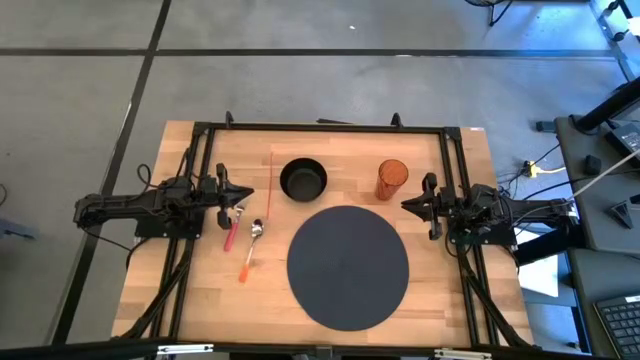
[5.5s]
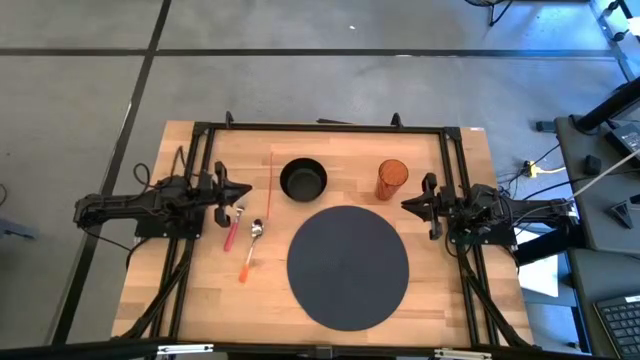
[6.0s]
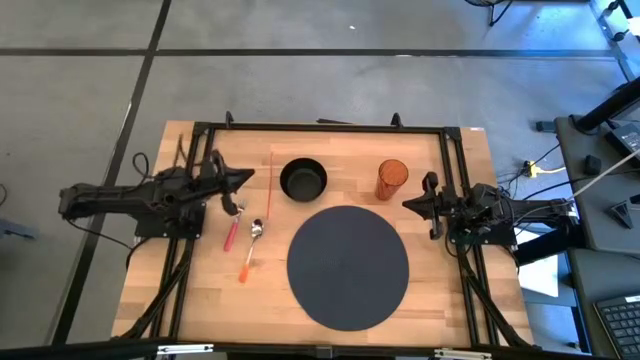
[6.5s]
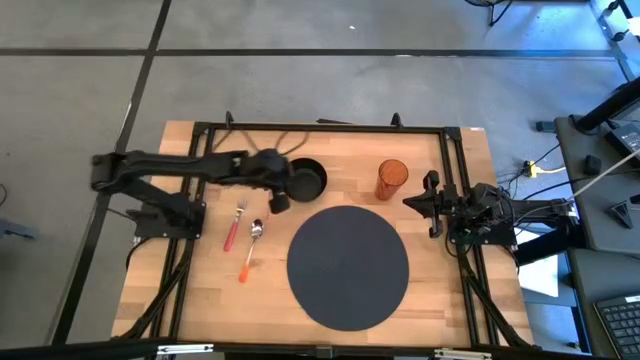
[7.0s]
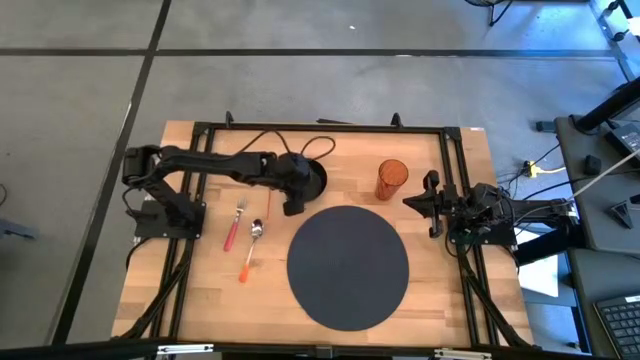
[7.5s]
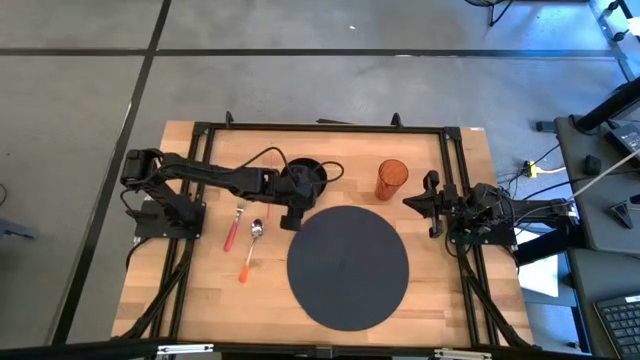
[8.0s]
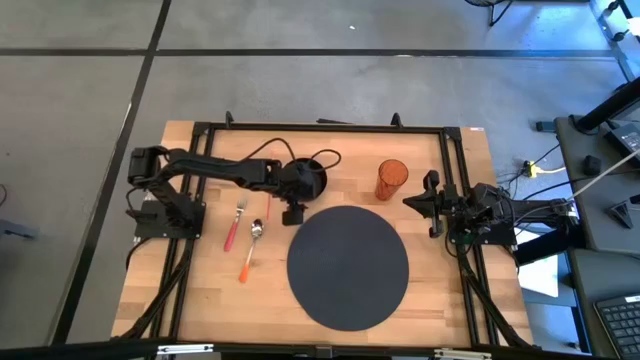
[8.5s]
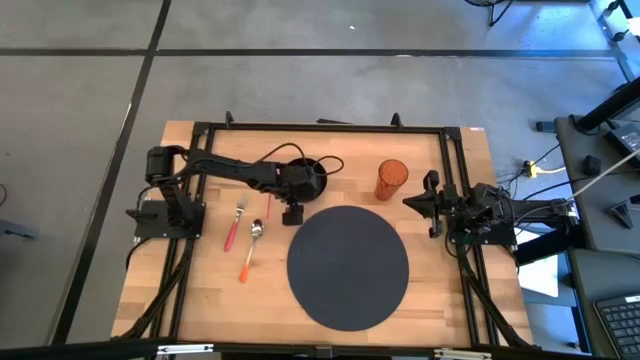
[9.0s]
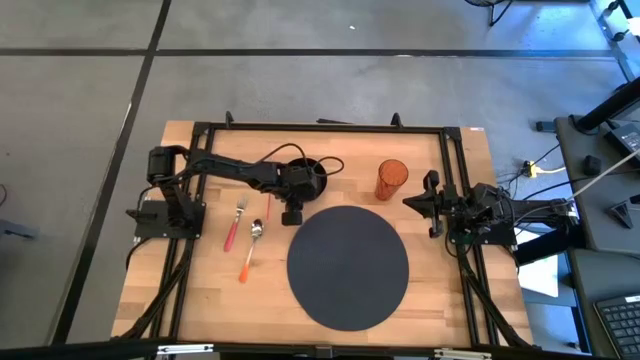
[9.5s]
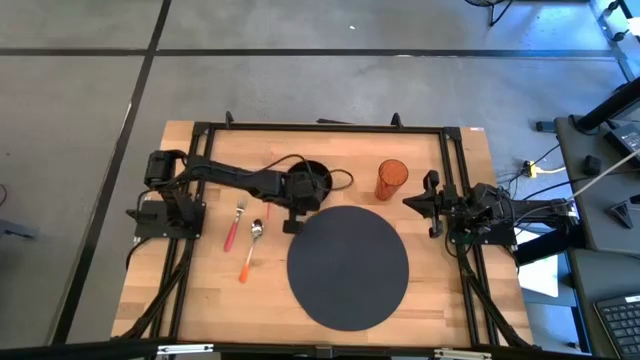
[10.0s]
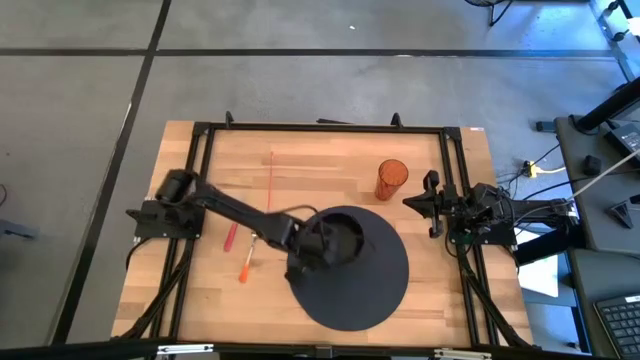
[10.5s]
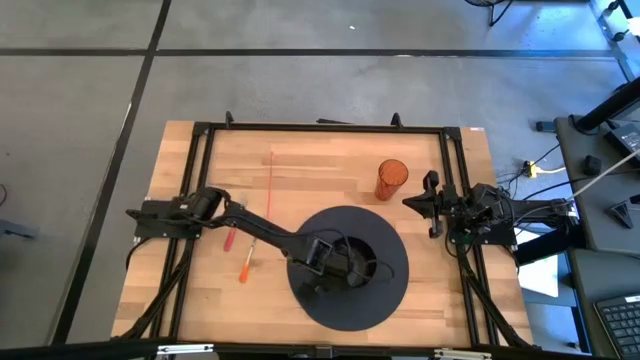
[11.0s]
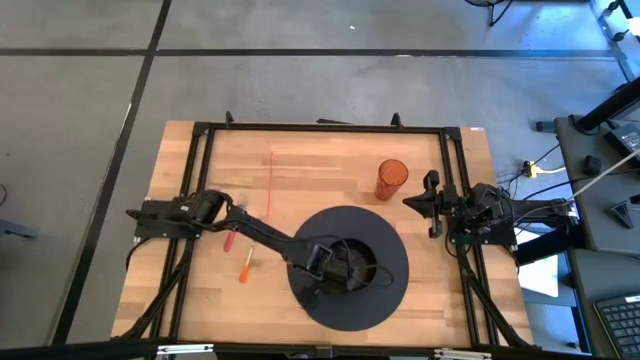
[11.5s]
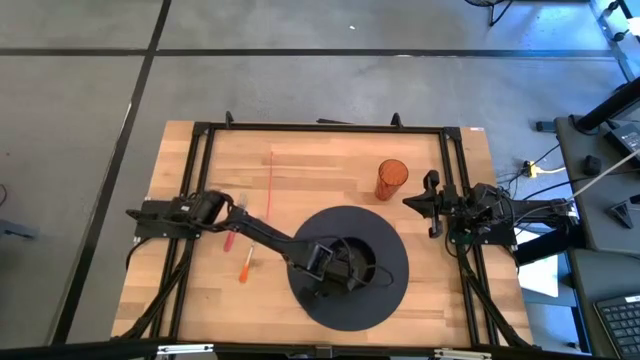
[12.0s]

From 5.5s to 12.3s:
Task: Pick & Place Utensil
Put the black bowl on the tablemat

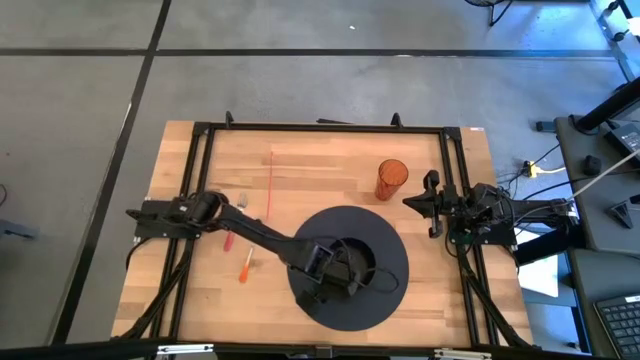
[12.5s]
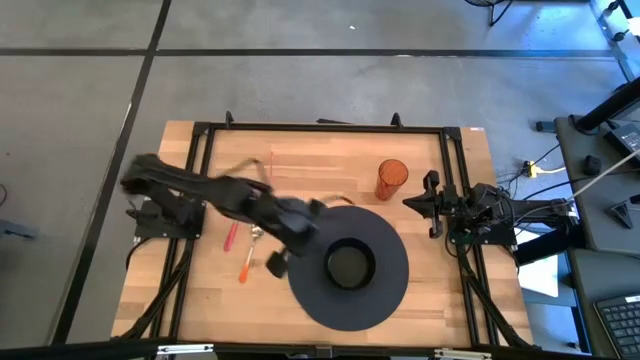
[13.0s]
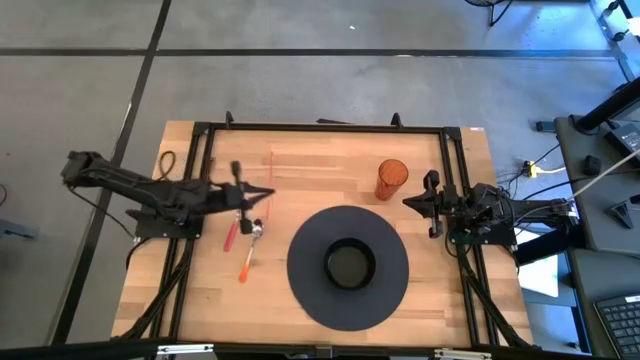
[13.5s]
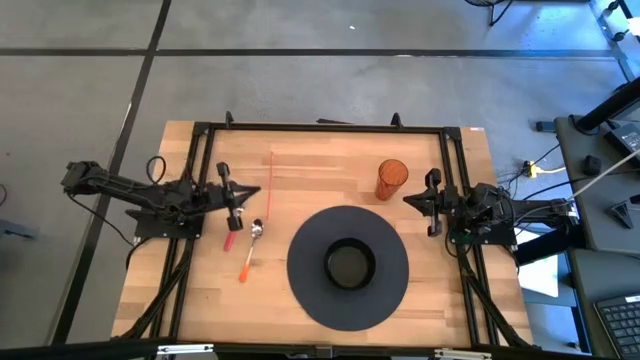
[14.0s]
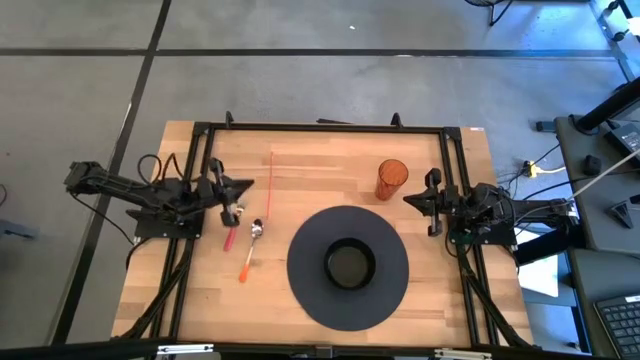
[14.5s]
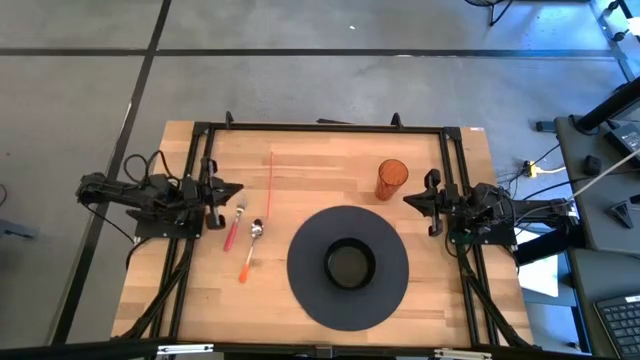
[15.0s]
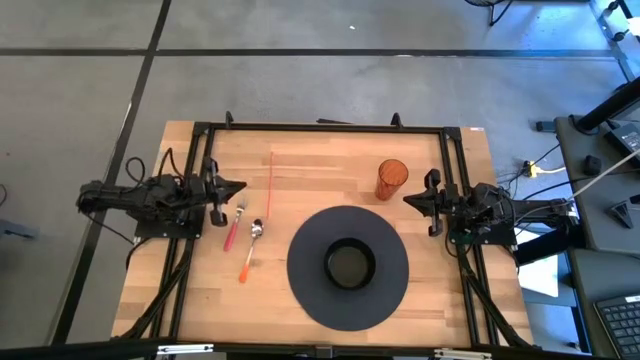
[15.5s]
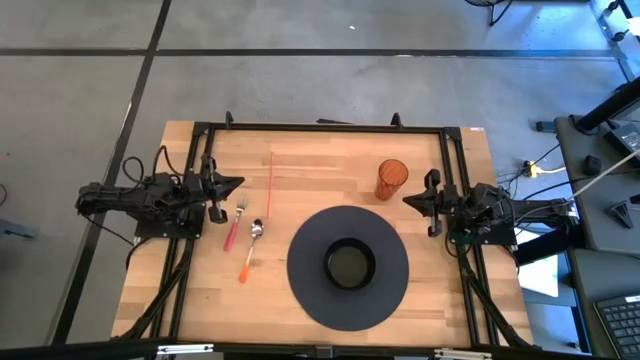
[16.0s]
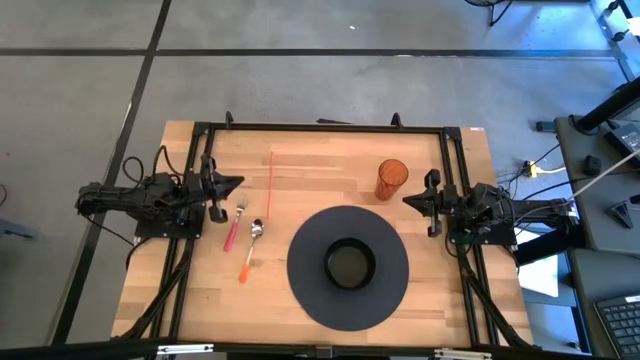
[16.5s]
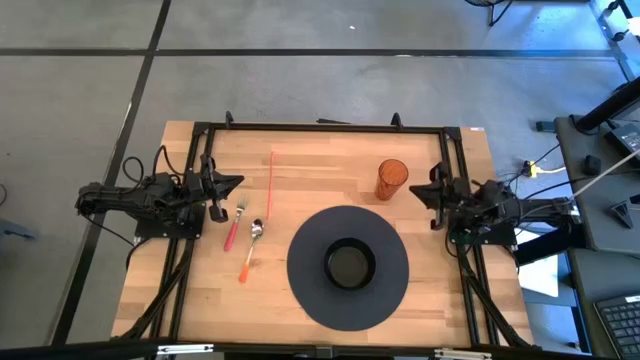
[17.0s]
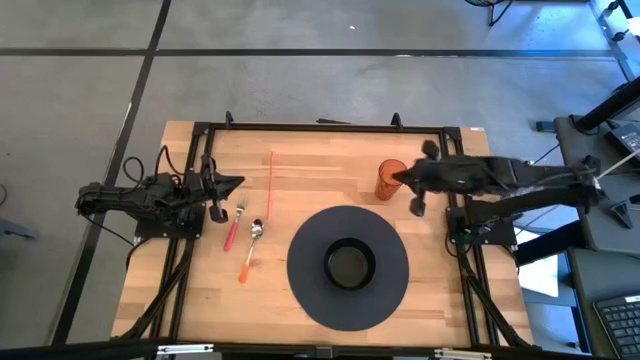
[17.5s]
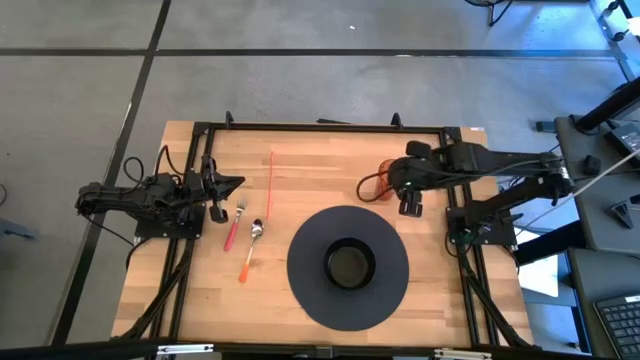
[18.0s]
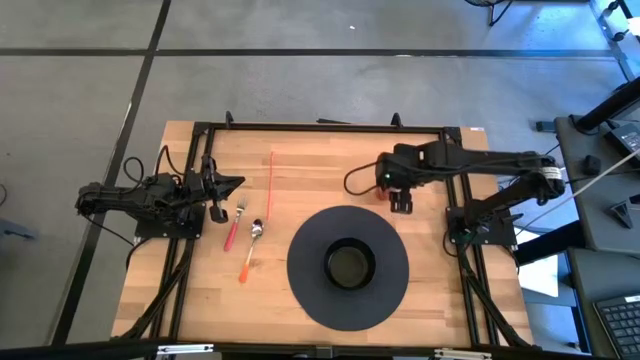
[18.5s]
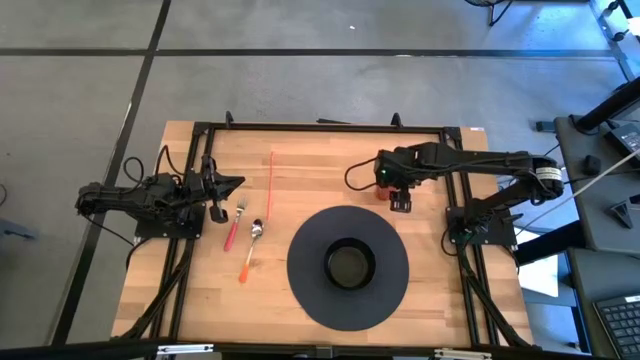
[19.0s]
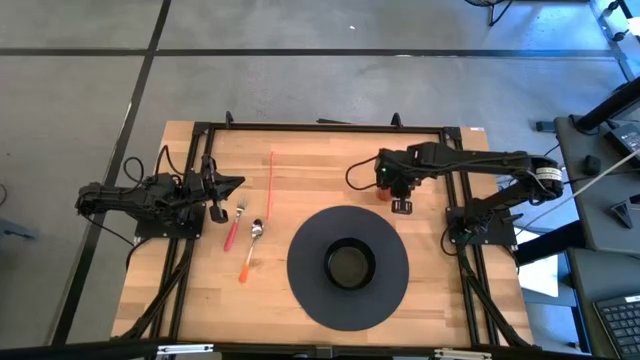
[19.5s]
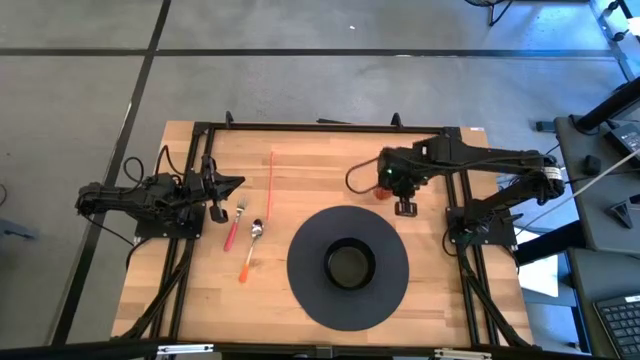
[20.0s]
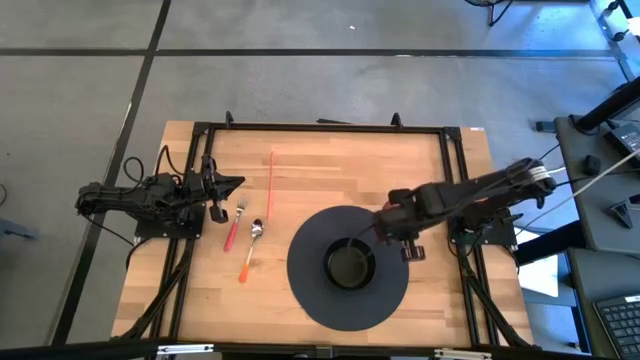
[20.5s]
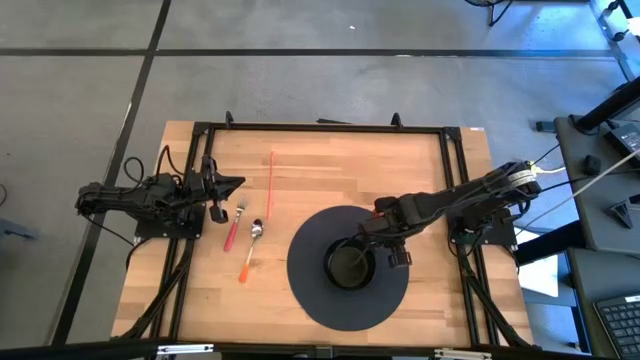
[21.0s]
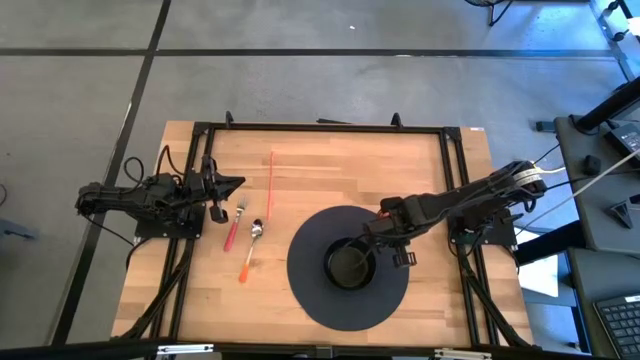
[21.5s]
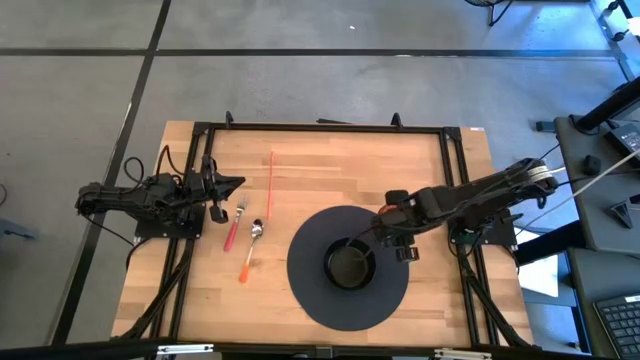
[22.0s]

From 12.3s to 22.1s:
Put the brown glass on the top right of the black bowl

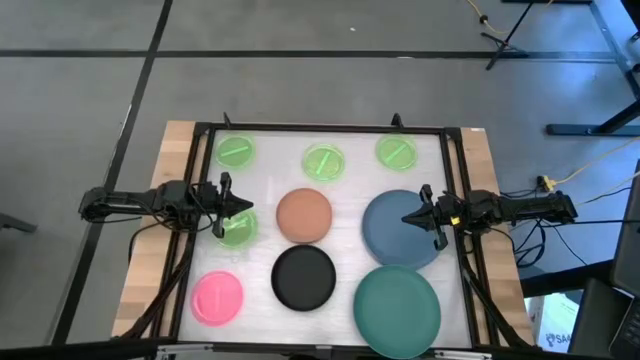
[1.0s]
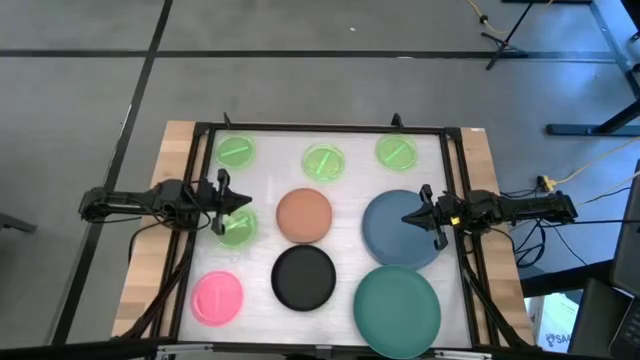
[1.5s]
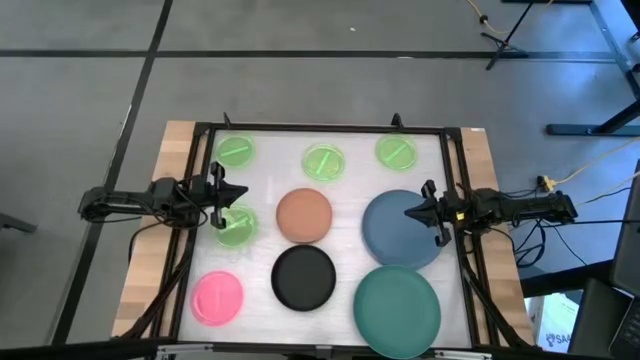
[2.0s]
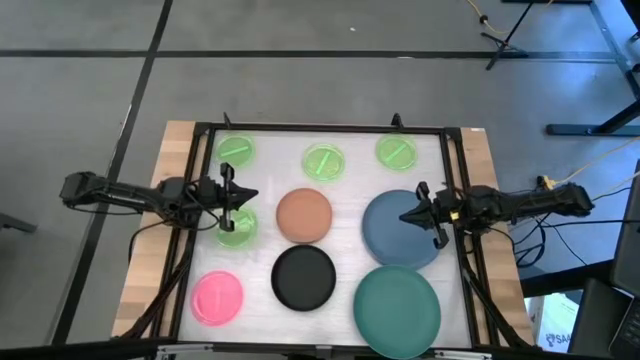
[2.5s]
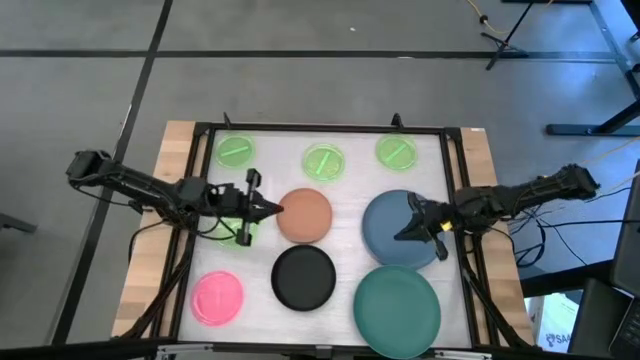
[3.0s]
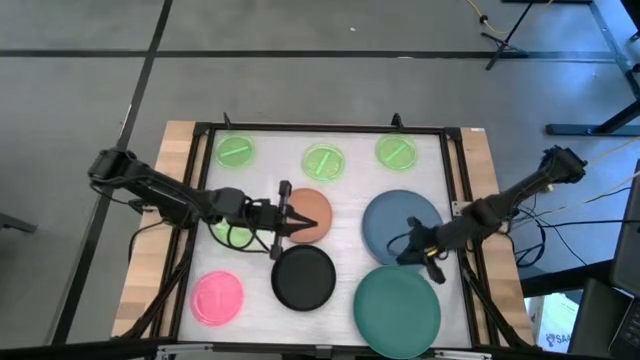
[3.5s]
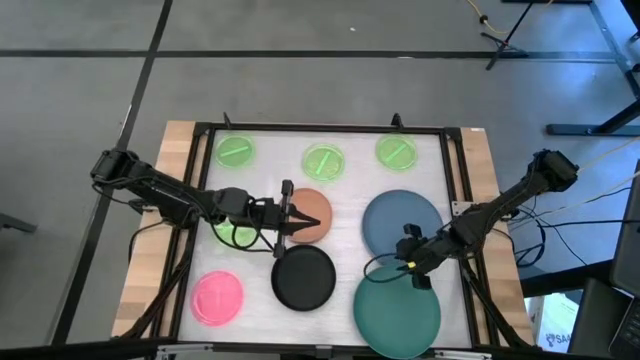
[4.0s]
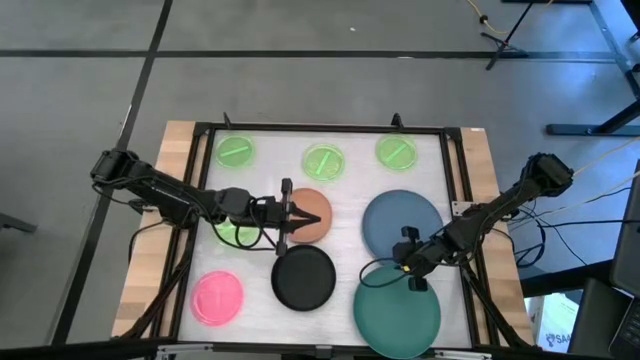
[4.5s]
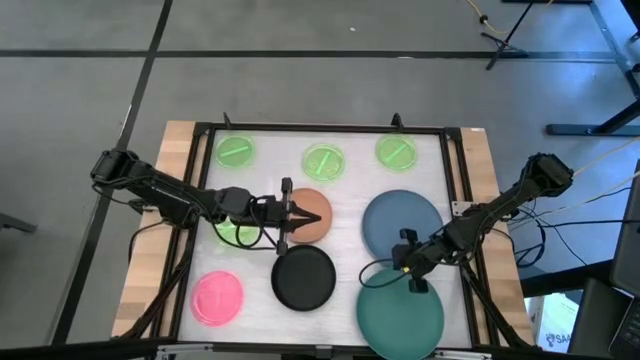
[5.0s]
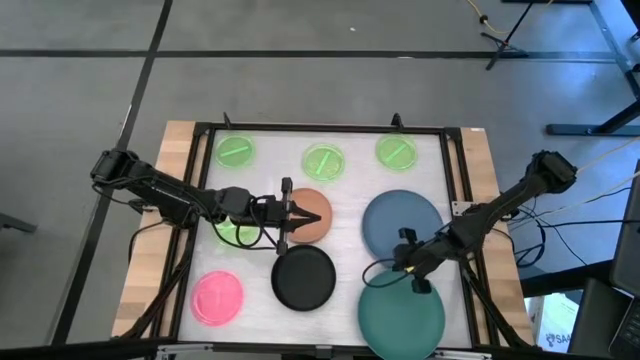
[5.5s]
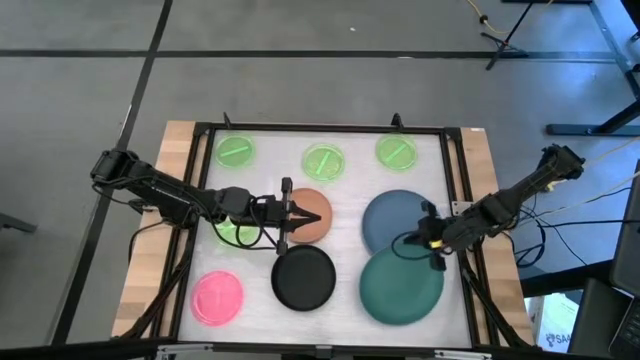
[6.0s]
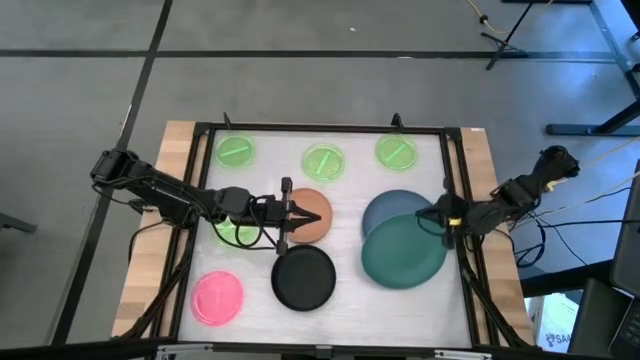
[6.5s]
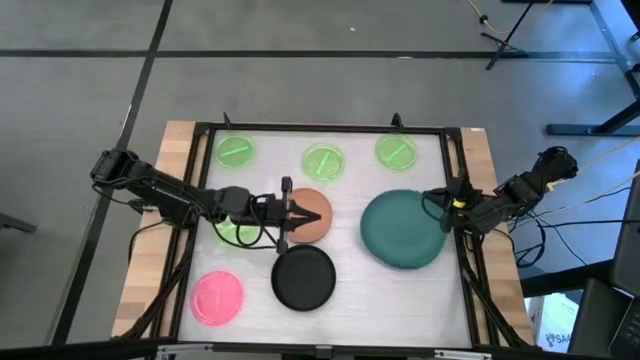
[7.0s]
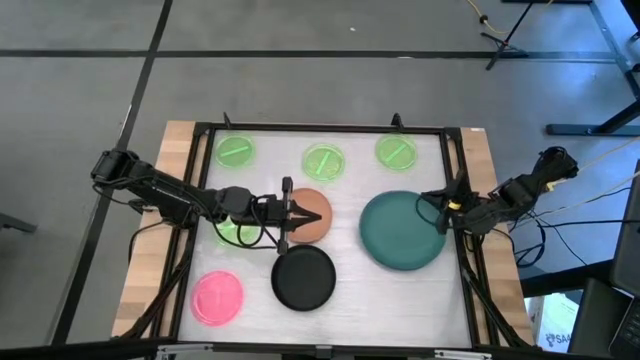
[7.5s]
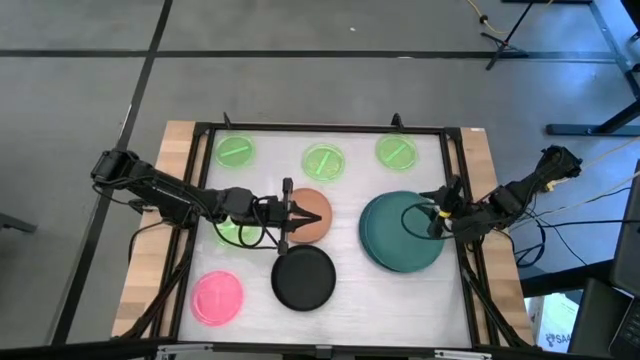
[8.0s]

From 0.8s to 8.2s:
Task: Stack plastic plates
Stack the green plate into the blue plate
